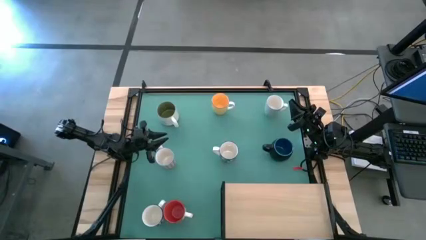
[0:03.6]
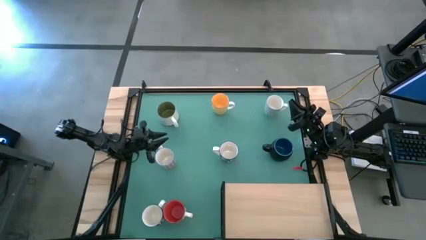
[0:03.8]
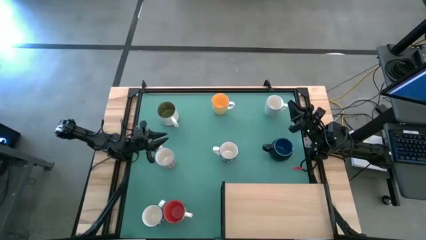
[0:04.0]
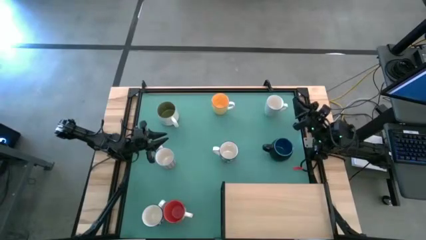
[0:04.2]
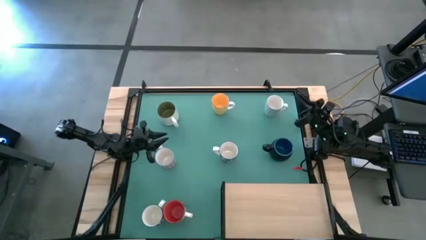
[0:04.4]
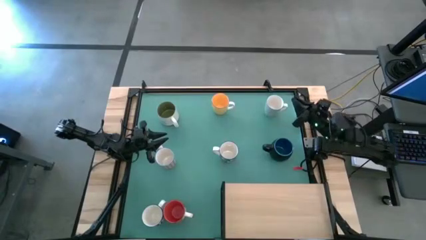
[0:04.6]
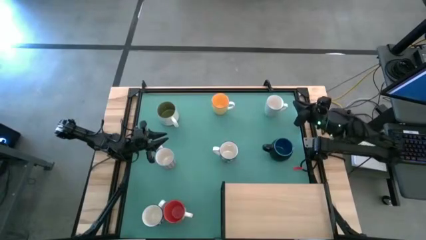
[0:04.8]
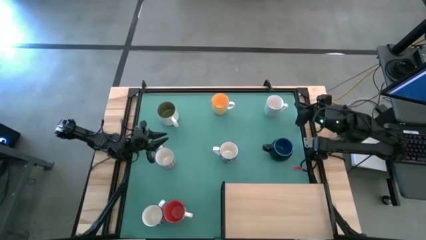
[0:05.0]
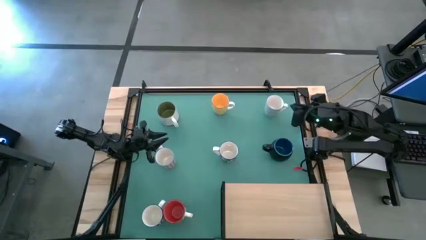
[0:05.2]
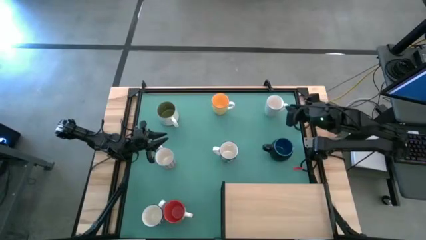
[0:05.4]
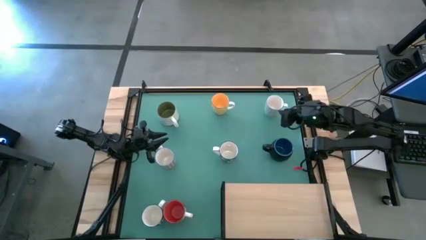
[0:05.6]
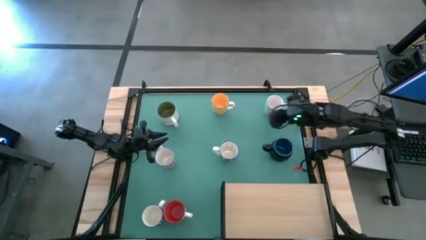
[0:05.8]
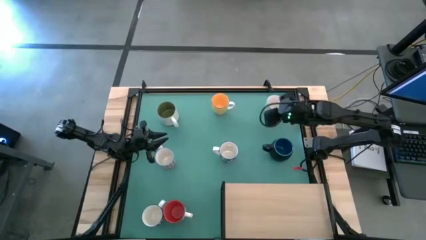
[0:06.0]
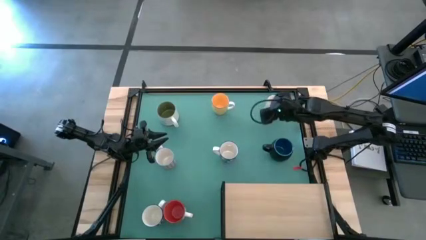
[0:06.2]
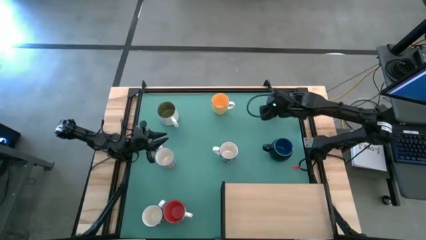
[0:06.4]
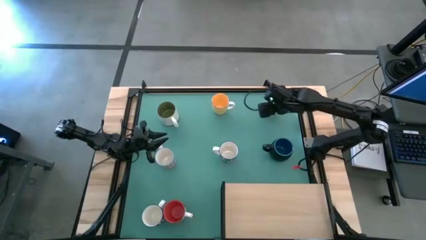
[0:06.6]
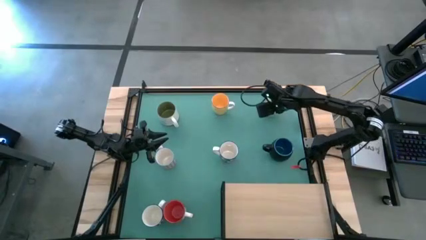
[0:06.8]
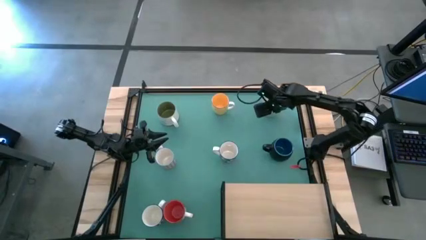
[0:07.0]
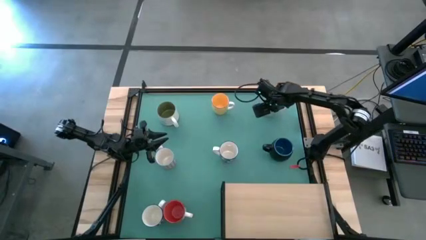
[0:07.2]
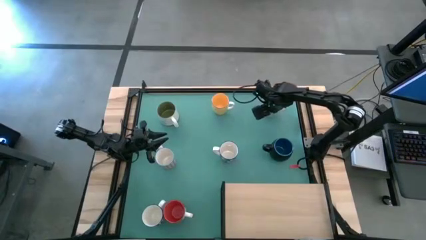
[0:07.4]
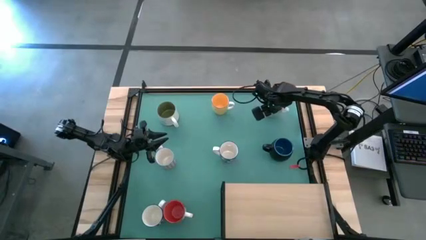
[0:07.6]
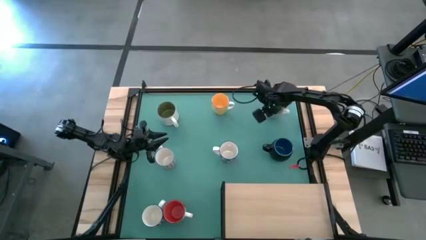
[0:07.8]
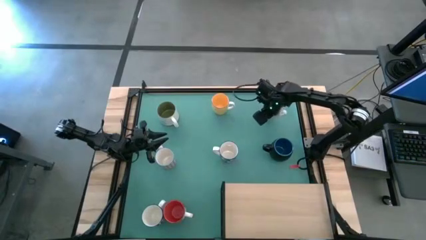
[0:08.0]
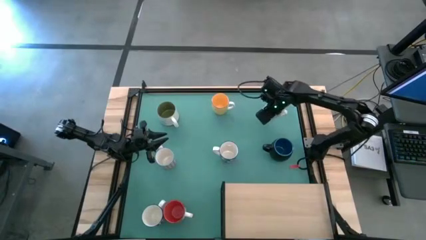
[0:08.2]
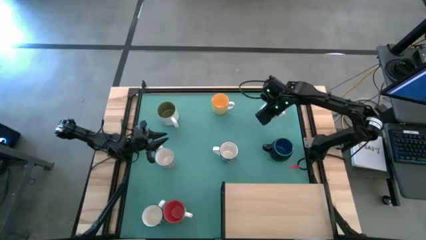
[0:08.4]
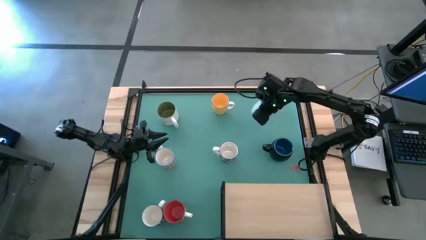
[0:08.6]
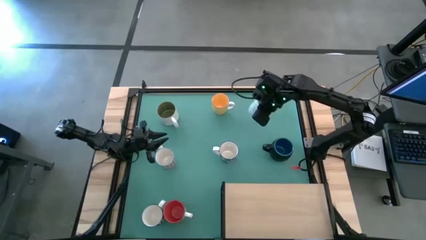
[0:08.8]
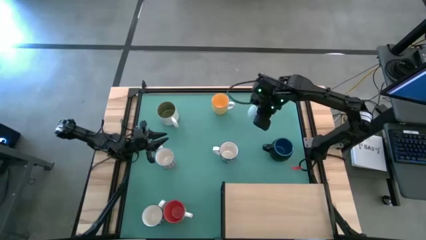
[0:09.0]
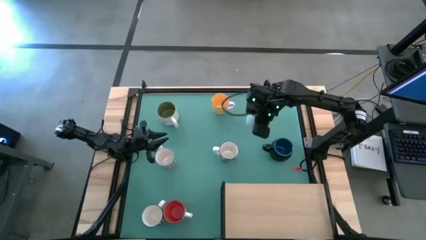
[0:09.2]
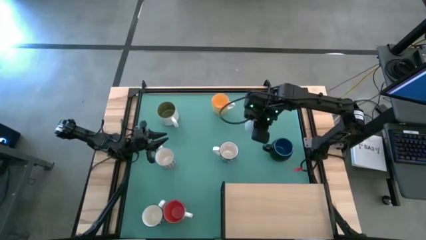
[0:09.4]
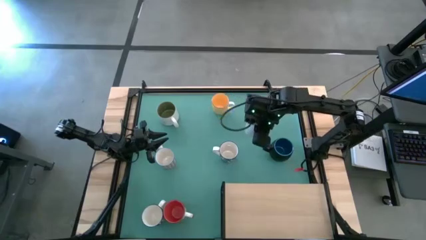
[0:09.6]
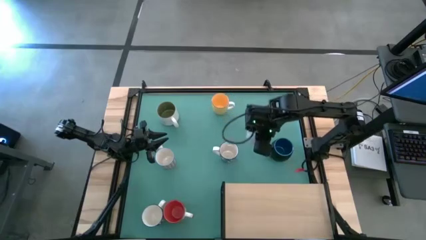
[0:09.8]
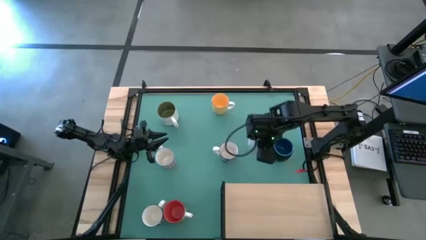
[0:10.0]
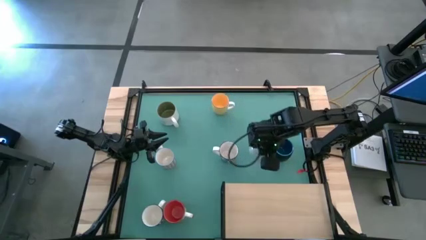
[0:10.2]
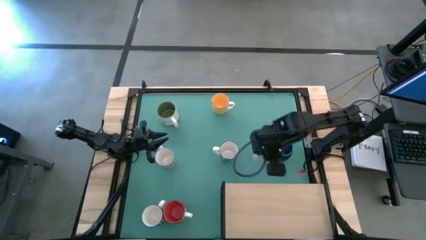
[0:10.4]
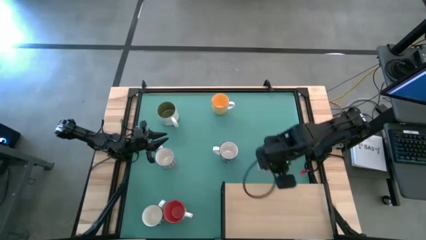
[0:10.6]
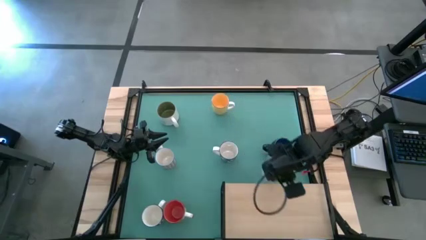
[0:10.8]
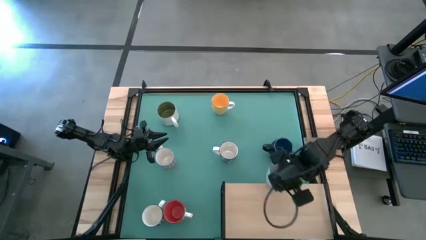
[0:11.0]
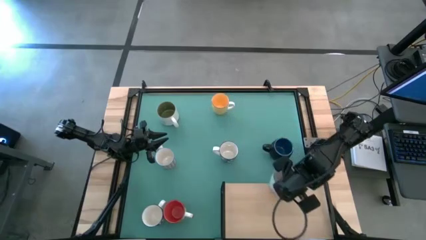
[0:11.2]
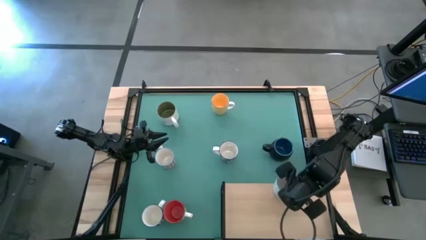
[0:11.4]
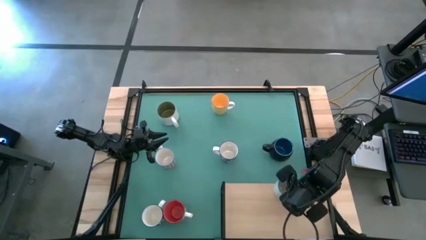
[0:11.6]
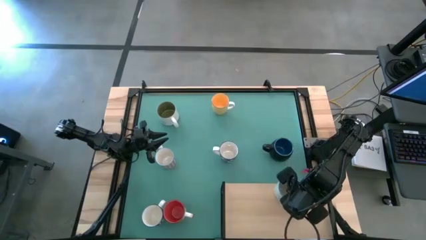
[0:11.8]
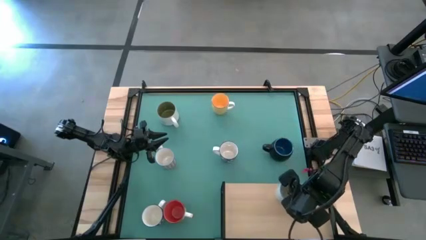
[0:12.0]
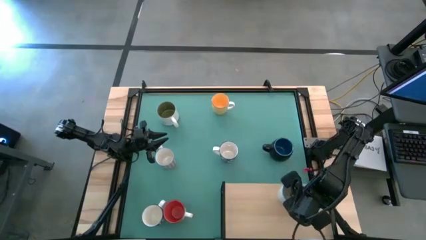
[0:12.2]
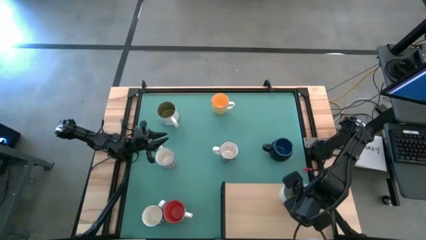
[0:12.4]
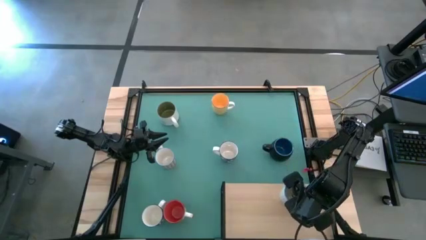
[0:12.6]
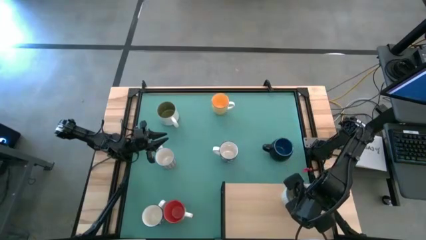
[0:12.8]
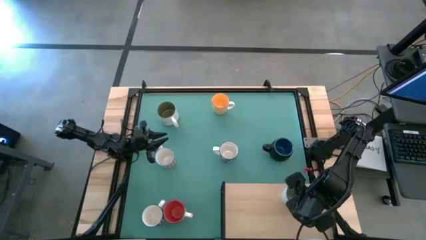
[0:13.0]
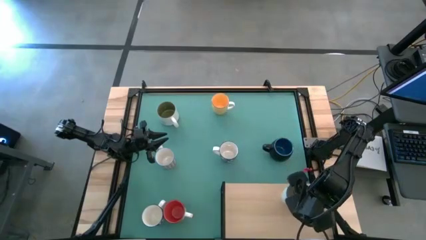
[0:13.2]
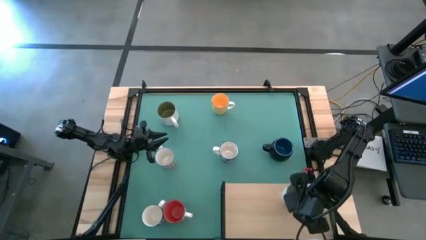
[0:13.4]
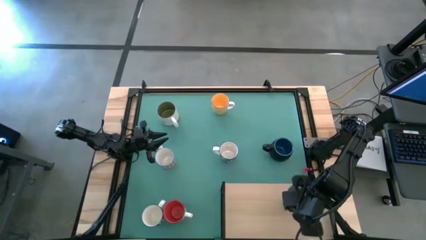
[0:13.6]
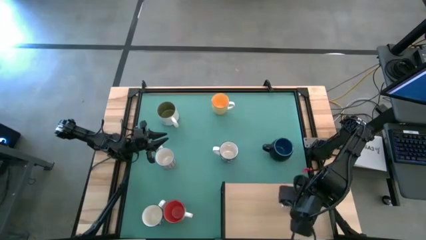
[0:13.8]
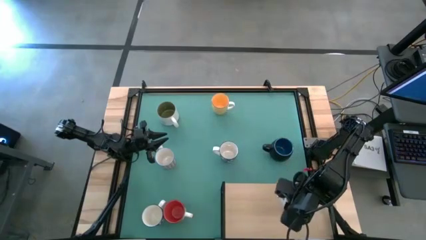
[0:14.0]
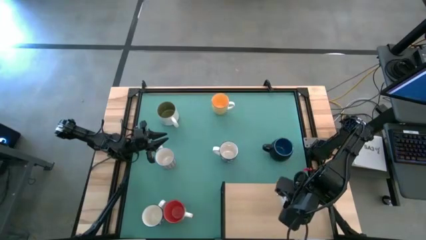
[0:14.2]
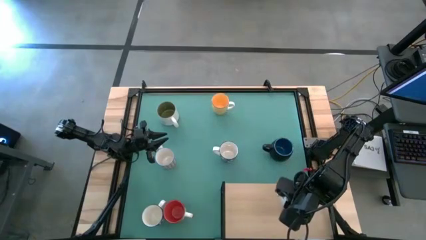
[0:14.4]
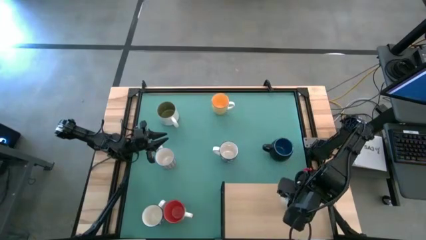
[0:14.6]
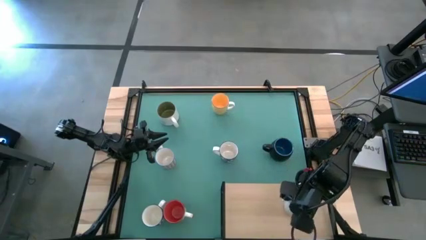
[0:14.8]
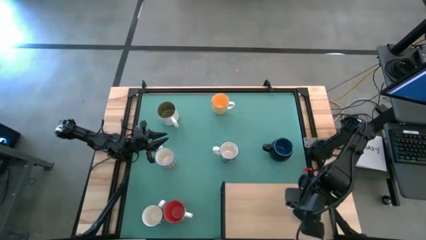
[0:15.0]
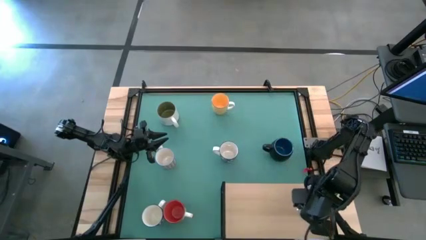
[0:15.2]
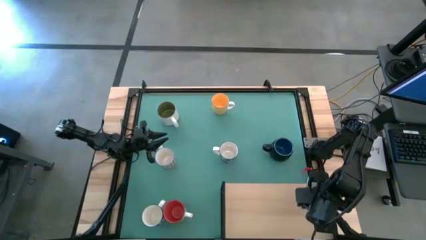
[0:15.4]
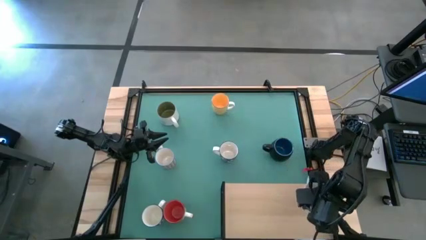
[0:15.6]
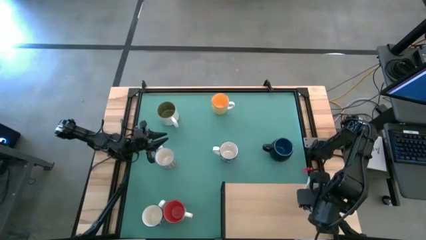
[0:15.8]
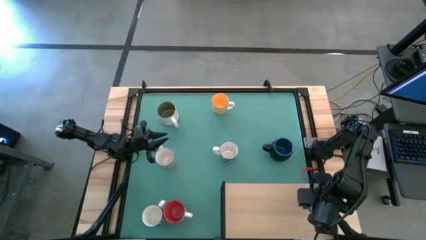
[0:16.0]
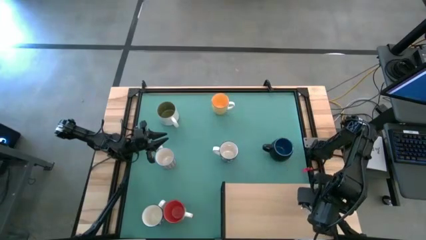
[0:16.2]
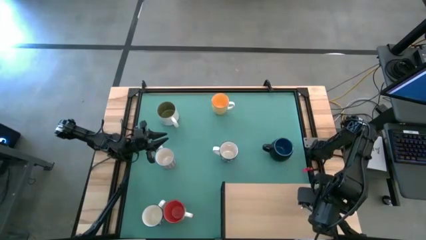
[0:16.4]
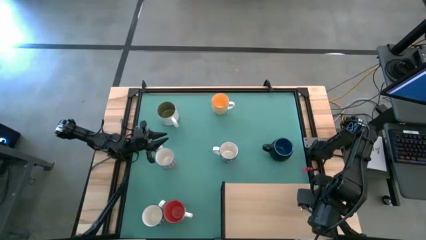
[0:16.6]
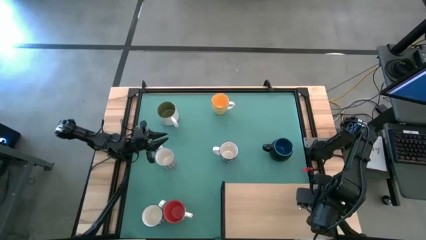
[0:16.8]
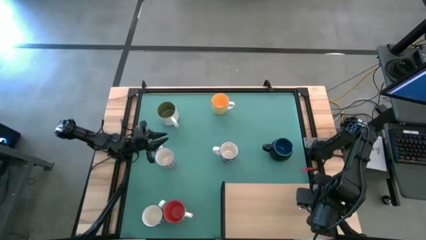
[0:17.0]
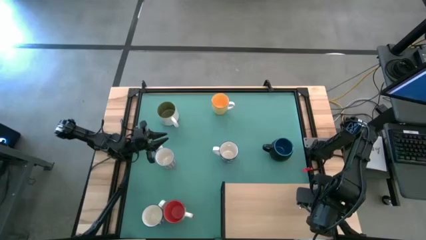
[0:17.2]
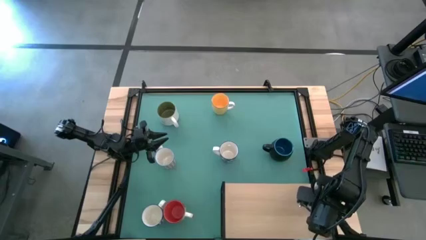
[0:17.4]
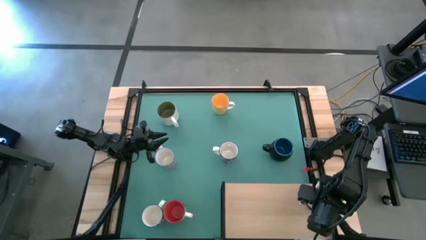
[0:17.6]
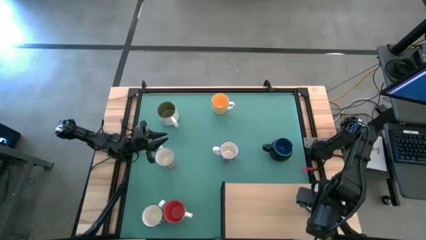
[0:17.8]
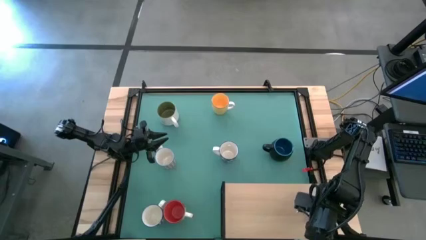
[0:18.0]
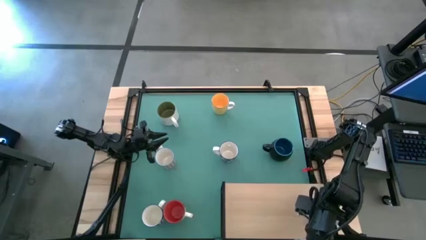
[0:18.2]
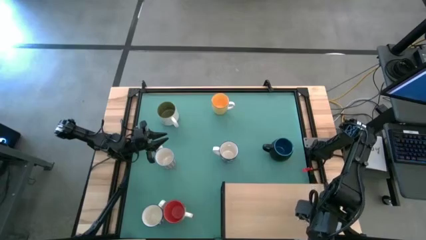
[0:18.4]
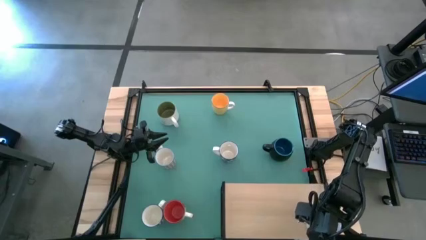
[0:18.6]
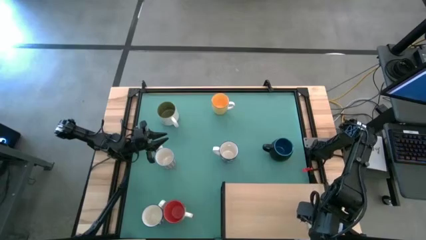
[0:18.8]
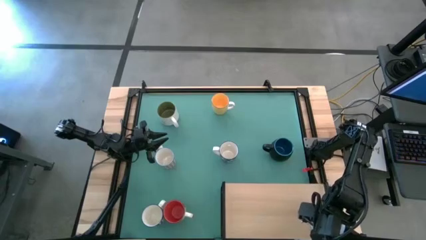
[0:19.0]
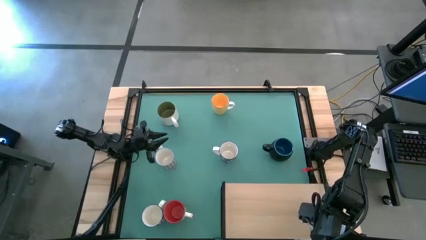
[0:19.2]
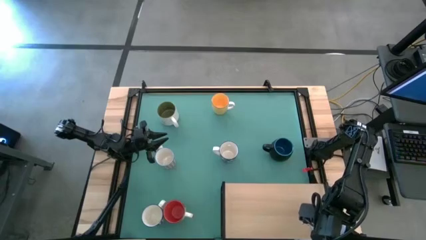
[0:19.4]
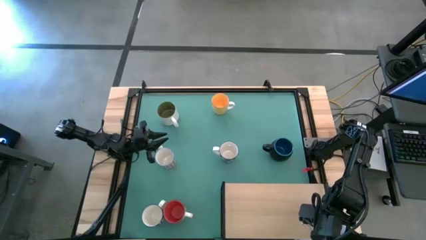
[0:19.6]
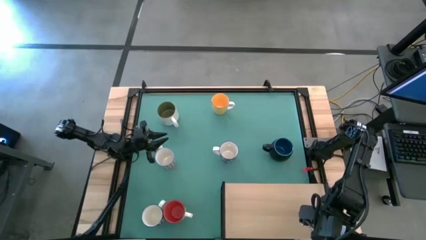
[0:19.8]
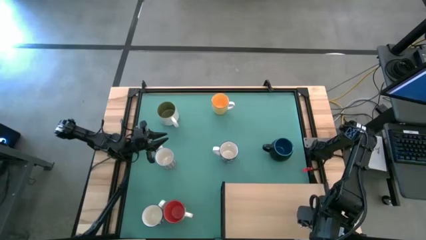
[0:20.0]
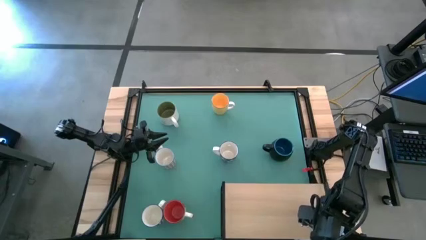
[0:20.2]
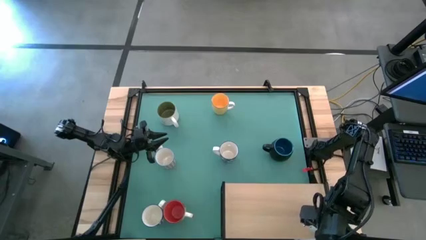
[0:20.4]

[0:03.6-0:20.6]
Task: Place coffee mugs
Put the light blue patterned mug on the shelf
